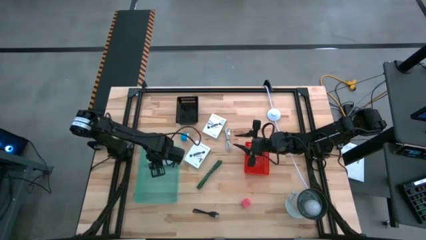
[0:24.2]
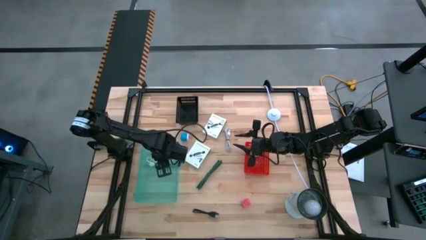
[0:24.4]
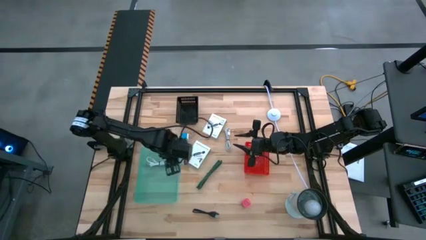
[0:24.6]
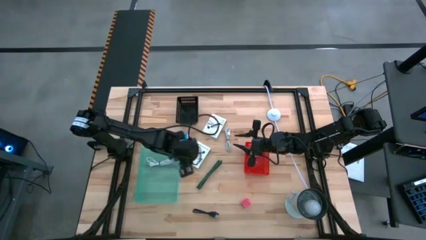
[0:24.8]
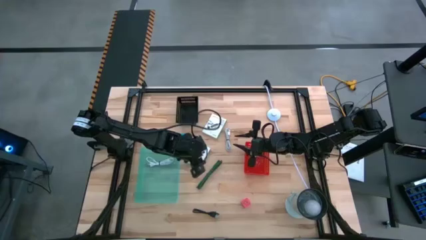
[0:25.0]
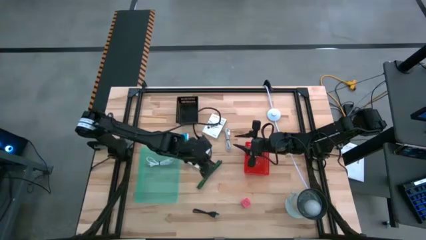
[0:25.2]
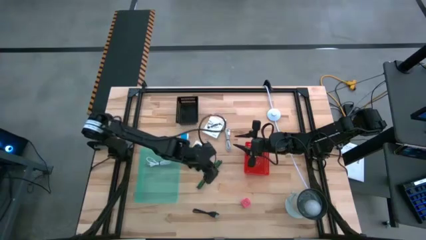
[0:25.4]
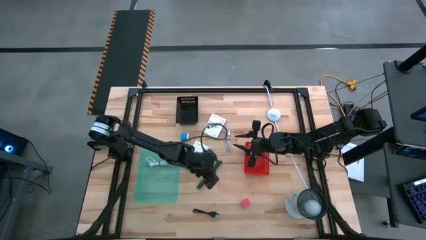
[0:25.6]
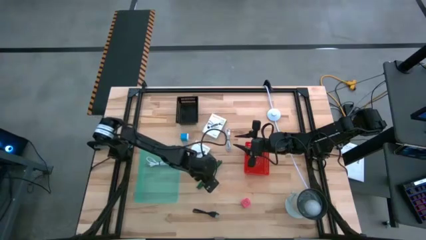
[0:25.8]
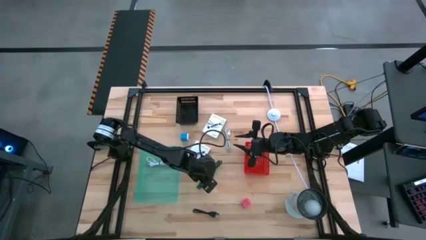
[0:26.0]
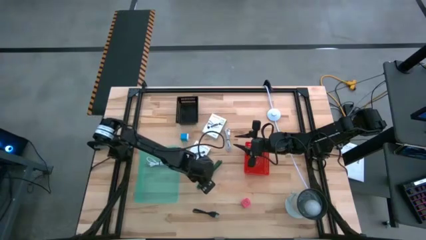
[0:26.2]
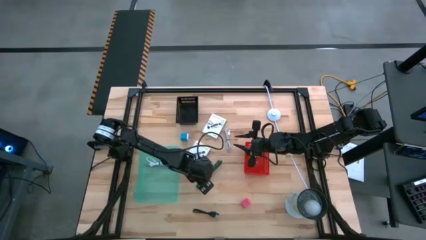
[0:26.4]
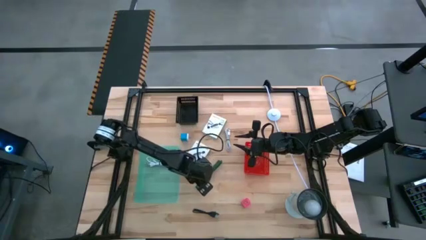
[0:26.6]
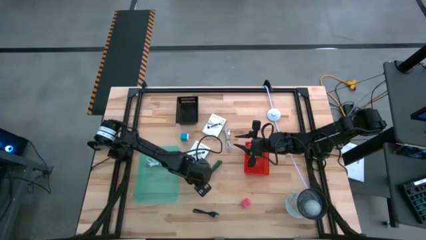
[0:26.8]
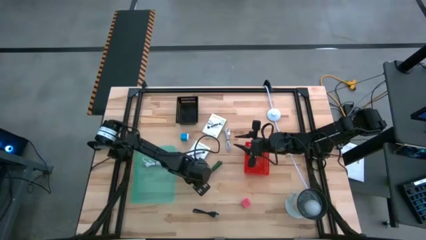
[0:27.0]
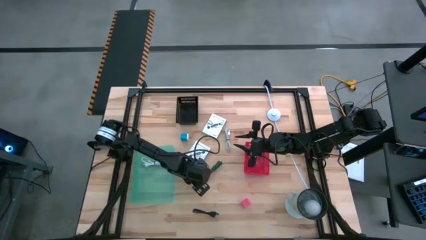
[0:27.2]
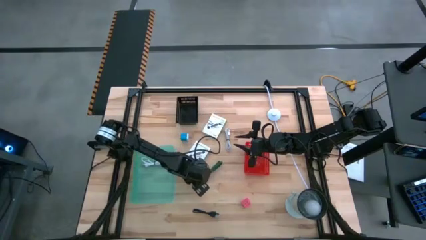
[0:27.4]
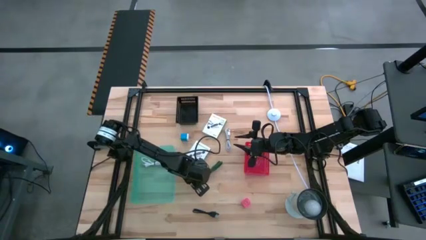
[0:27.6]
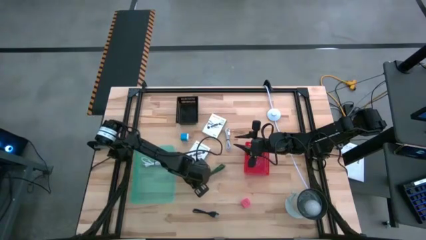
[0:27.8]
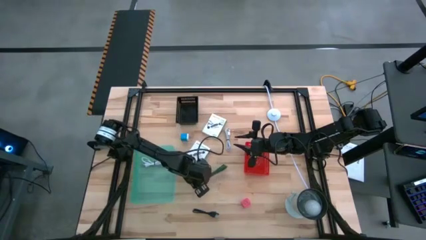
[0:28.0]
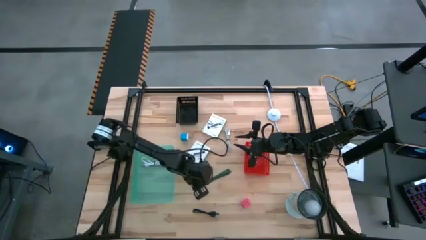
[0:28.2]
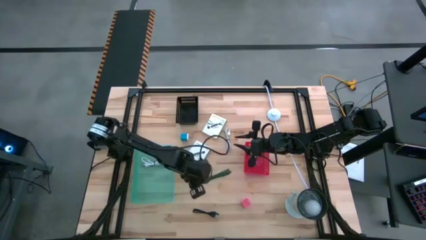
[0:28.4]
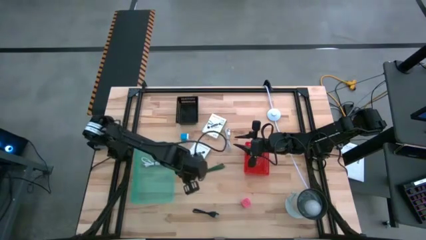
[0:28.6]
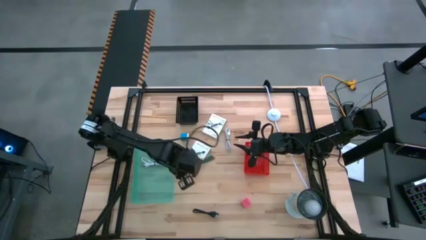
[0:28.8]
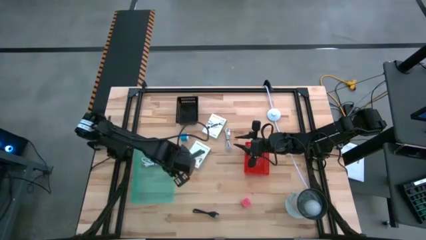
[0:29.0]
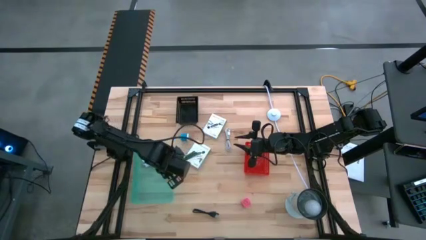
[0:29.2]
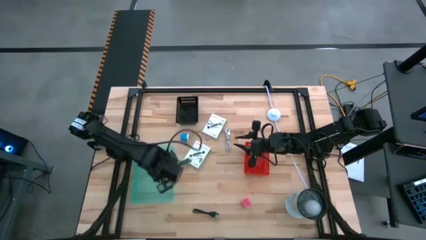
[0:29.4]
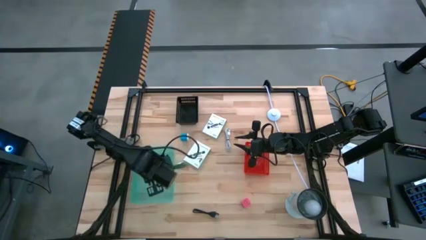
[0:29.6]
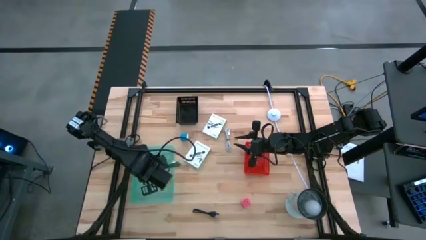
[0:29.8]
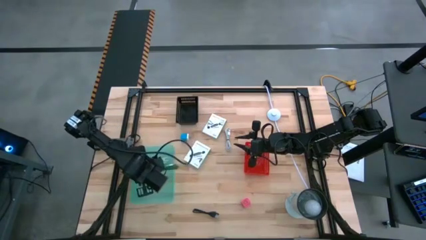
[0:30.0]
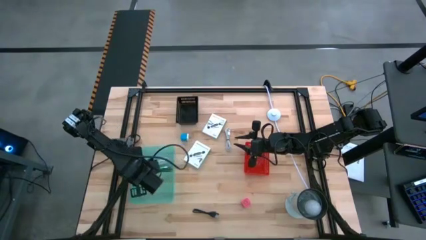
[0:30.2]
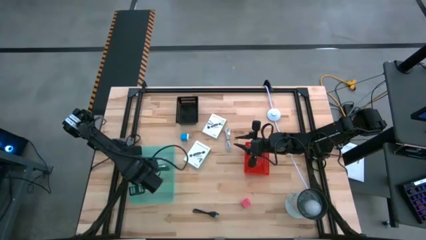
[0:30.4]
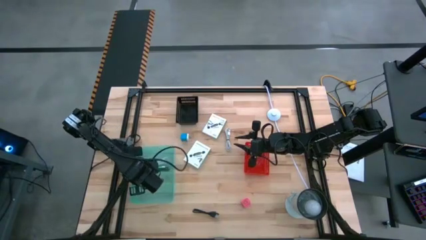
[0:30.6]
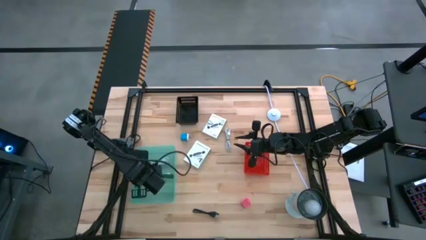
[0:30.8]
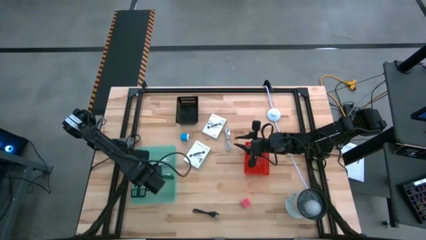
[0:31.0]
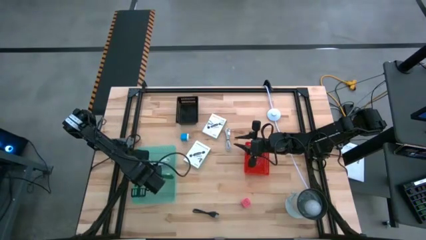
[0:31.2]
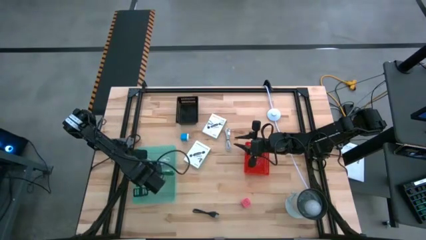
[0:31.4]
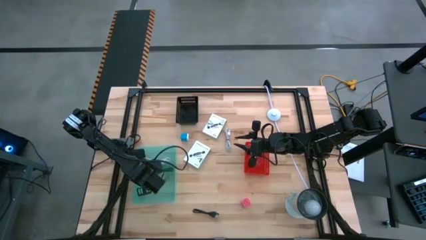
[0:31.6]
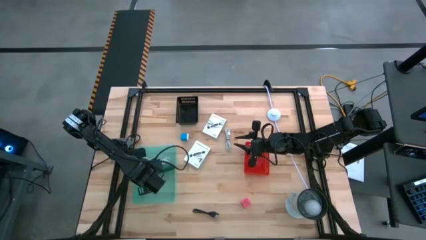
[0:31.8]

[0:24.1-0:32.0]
Task: Pick and place items into bin
Put the green USB cable into the light blue bin

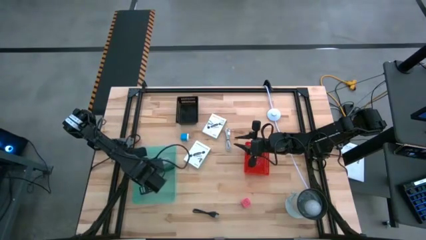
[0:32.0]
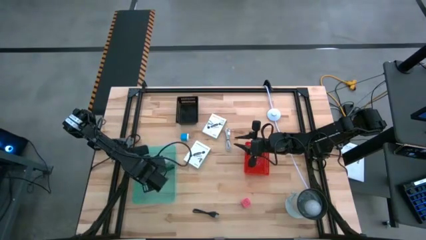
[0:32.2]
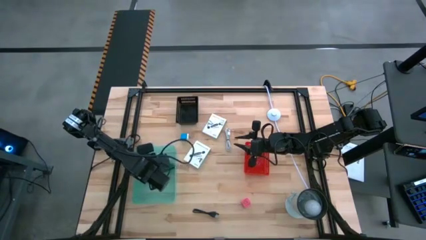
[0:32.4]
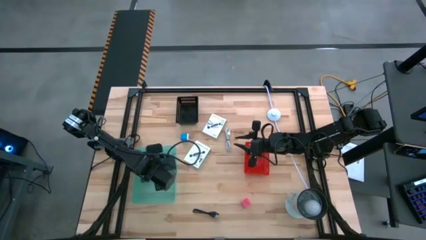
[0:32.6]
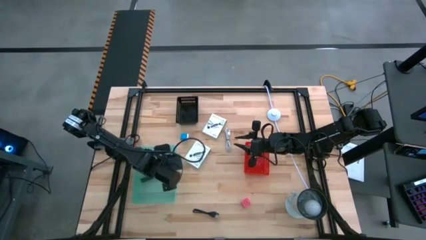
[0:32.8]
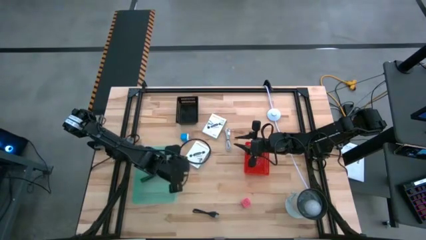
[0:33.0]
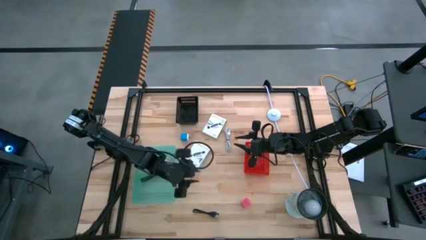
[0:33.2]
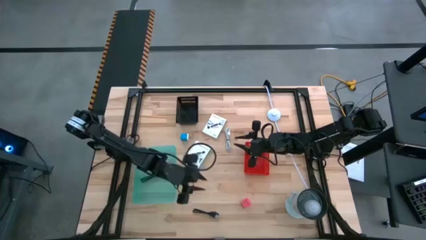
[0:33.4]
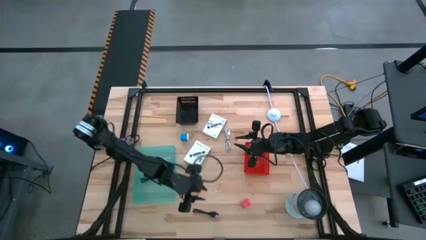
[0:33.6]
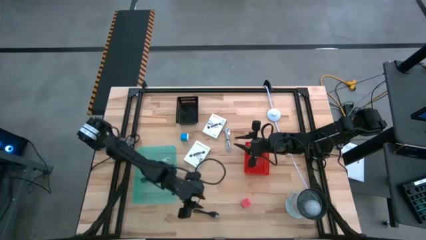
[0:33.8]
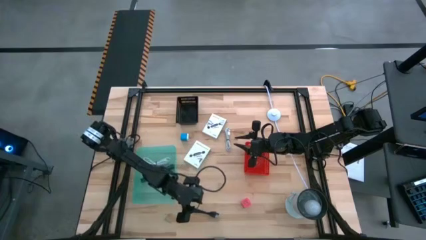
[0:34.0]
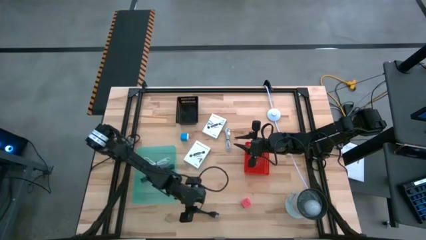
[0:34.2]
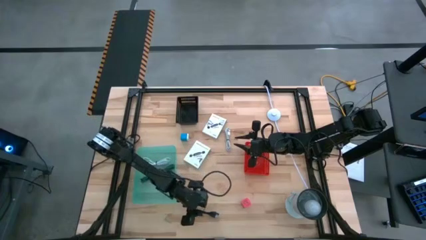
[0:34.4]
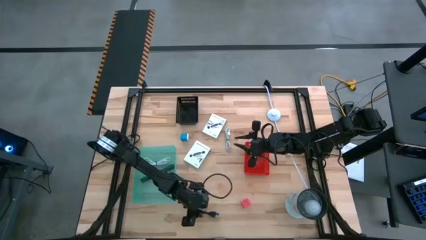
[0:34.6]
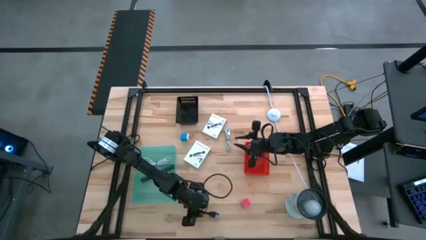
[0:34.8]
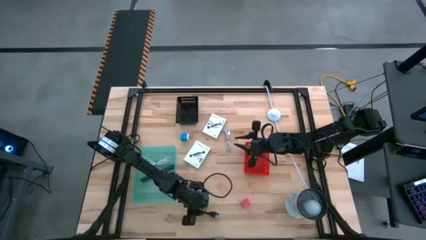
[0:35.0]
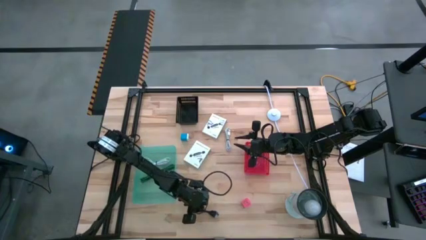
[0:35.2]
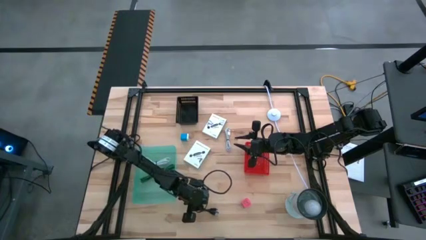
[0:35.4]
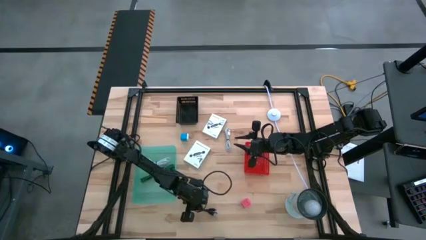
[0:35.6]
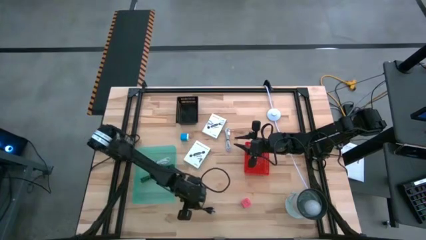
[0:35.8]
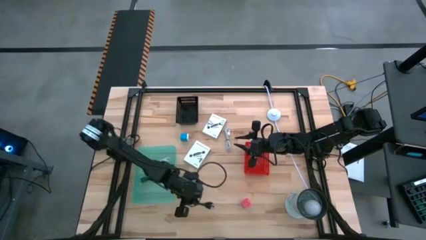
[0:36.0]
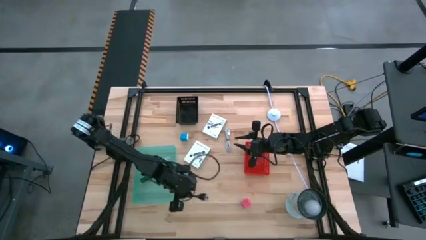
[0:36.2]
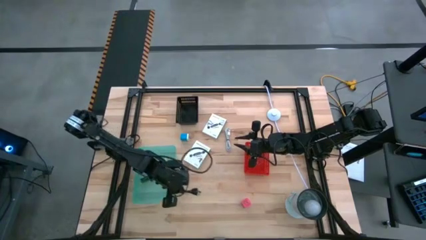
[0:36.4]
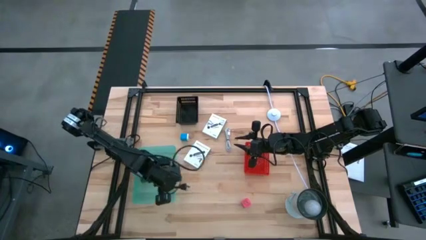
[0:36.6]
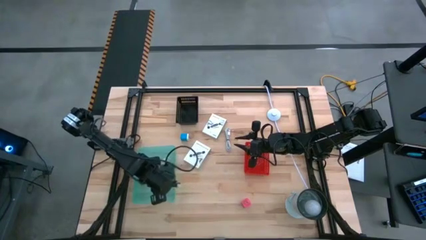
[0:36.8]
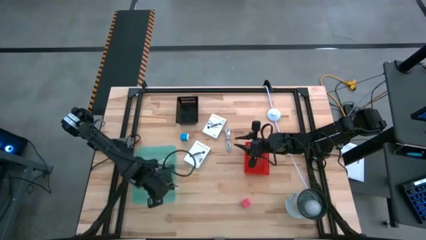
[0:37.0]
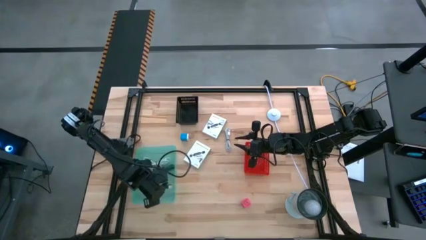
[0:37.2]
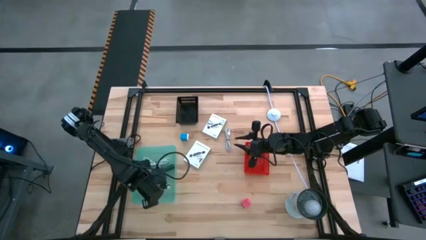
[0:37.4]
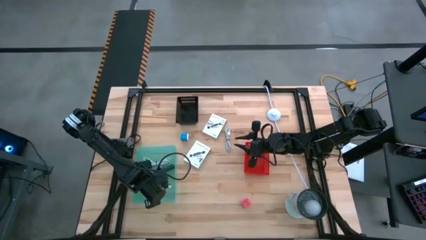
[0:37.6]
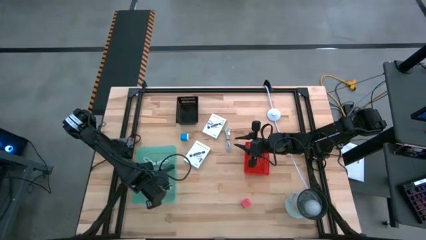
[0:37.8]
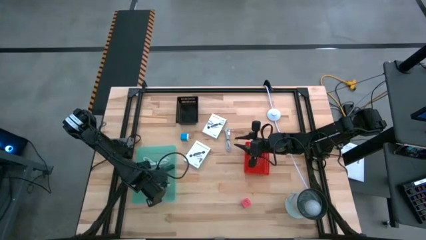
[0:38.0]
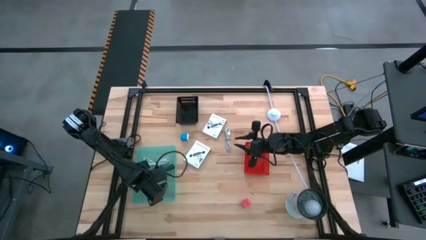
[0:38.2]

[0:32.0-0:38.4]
Put the black USB cable into the light blue bin
